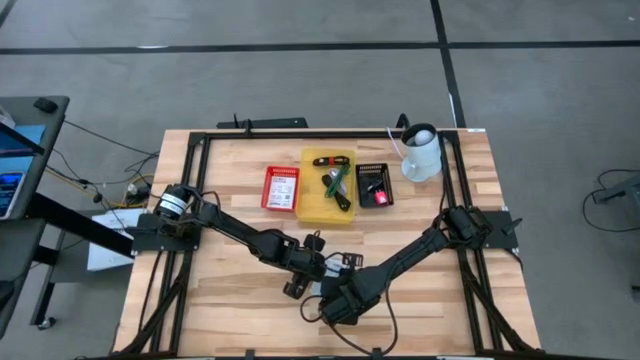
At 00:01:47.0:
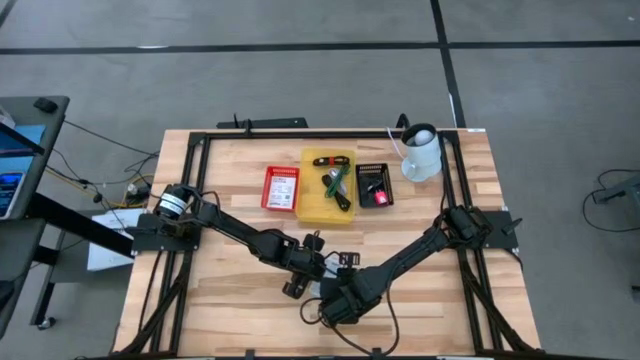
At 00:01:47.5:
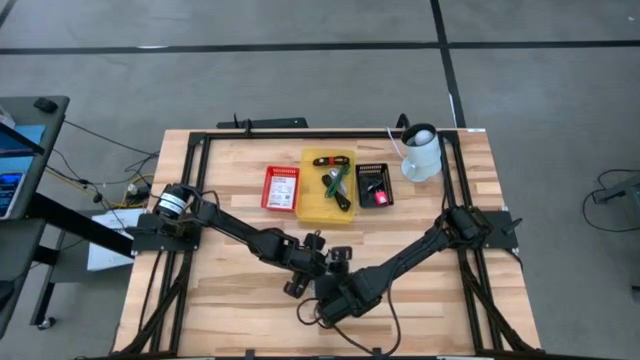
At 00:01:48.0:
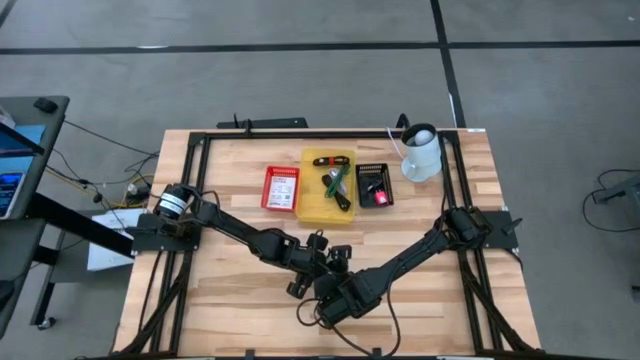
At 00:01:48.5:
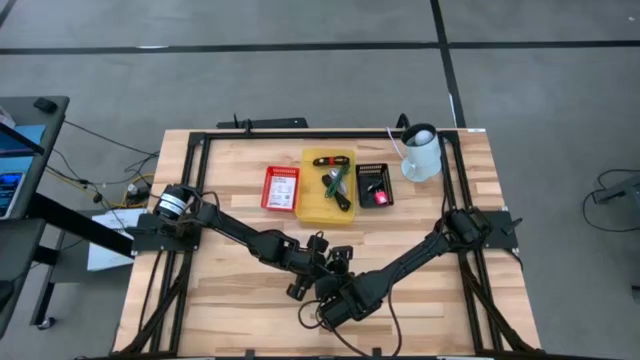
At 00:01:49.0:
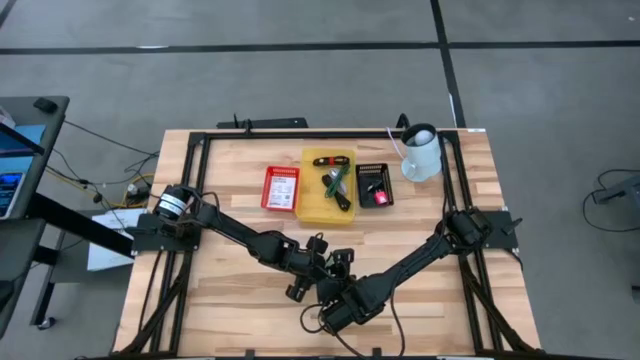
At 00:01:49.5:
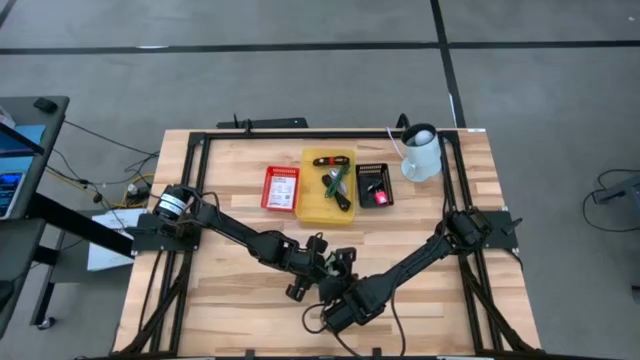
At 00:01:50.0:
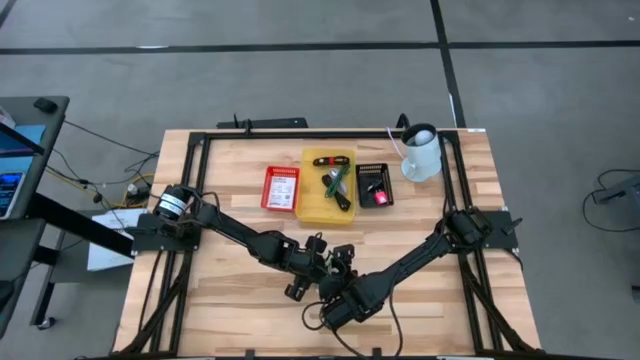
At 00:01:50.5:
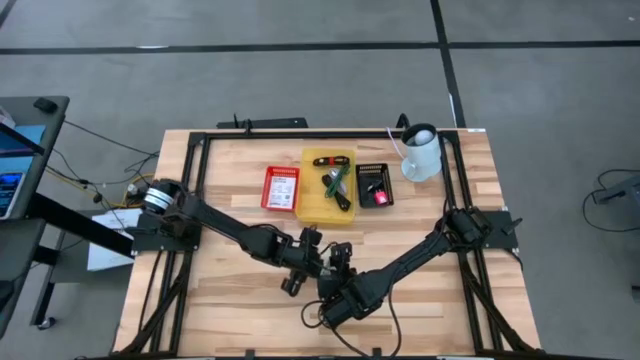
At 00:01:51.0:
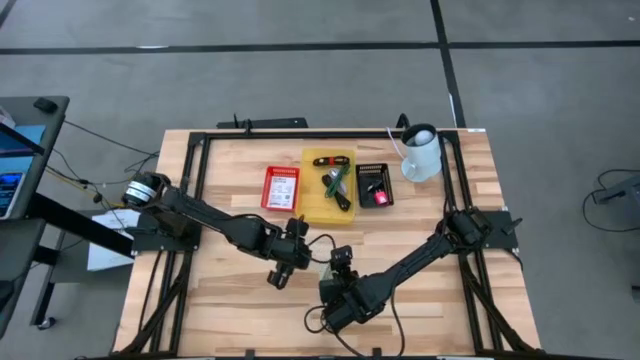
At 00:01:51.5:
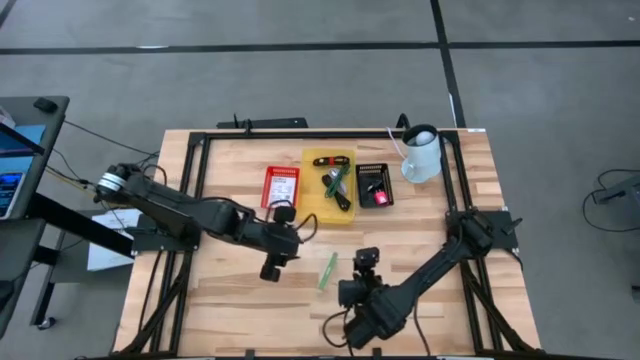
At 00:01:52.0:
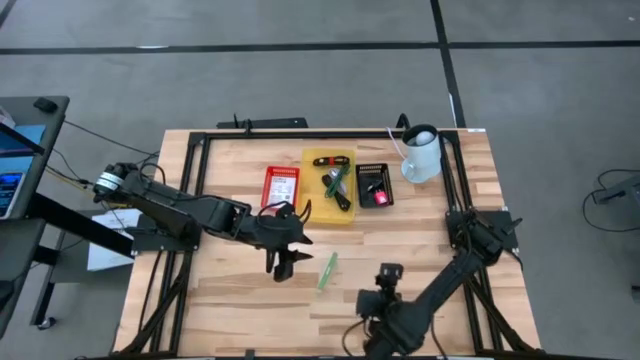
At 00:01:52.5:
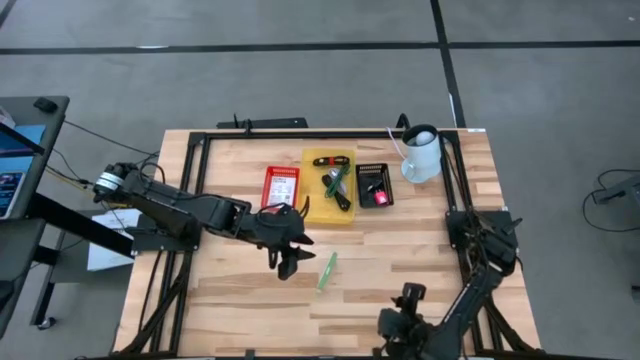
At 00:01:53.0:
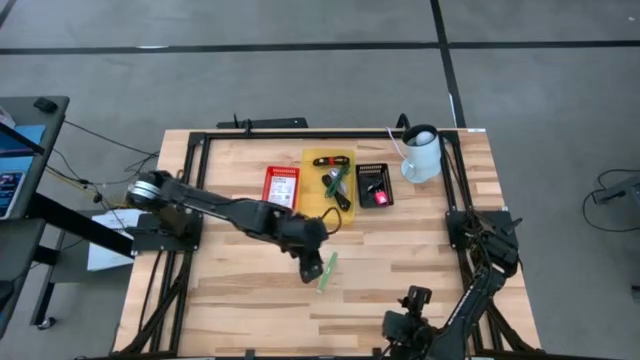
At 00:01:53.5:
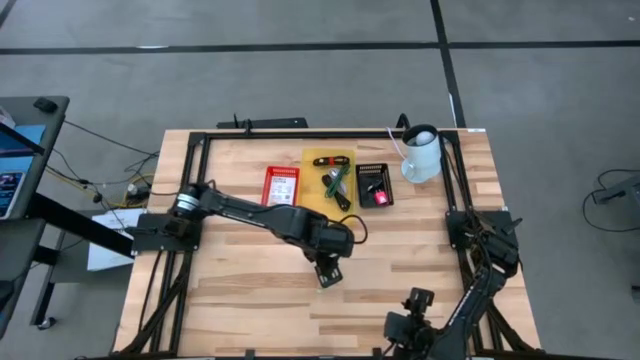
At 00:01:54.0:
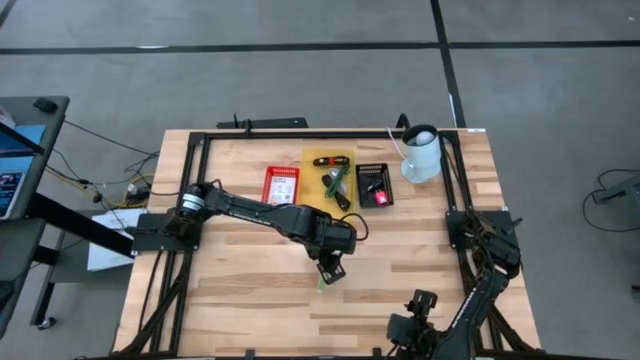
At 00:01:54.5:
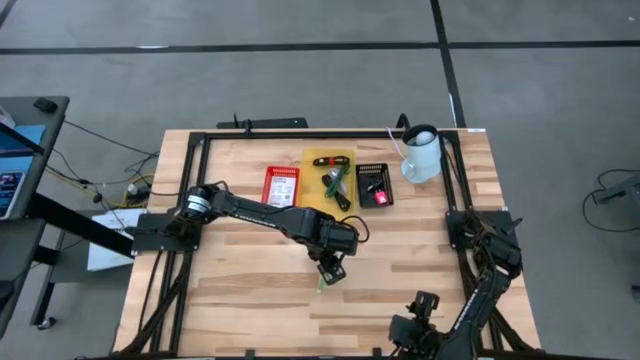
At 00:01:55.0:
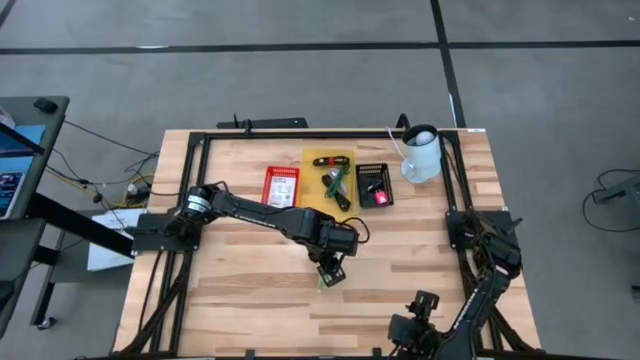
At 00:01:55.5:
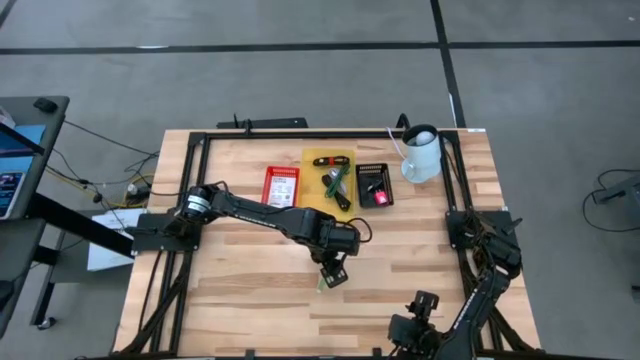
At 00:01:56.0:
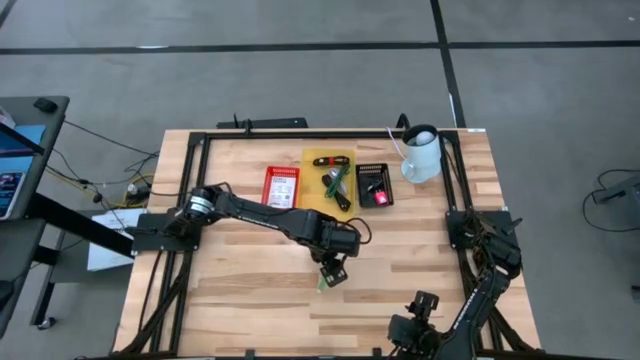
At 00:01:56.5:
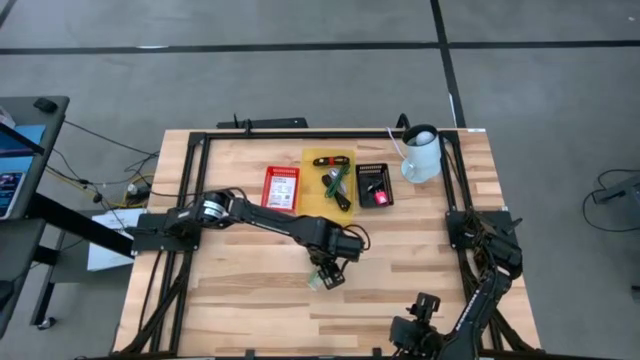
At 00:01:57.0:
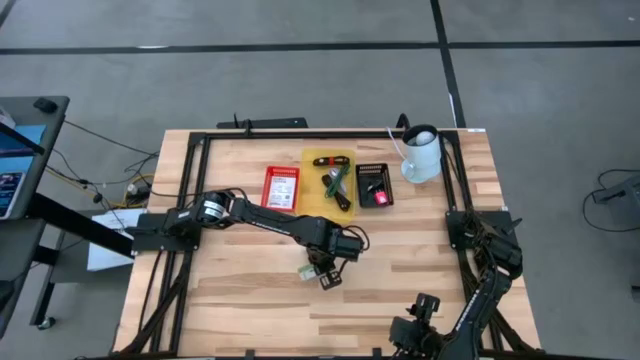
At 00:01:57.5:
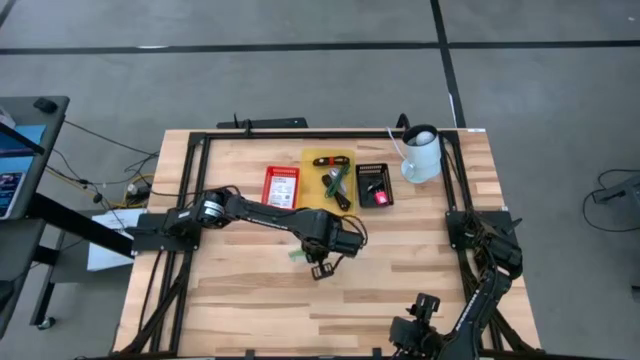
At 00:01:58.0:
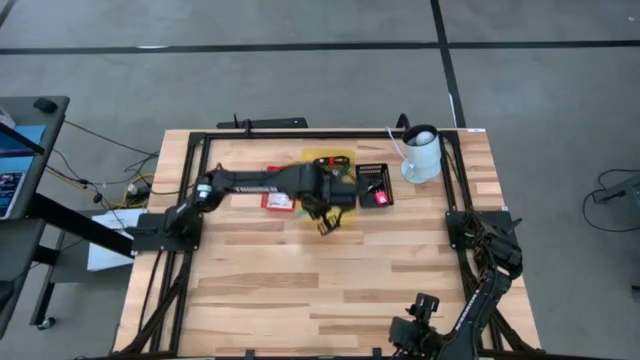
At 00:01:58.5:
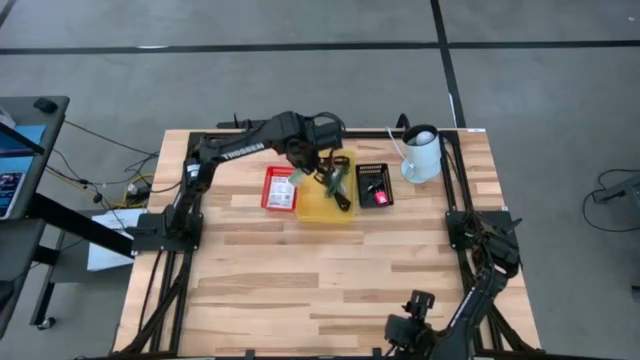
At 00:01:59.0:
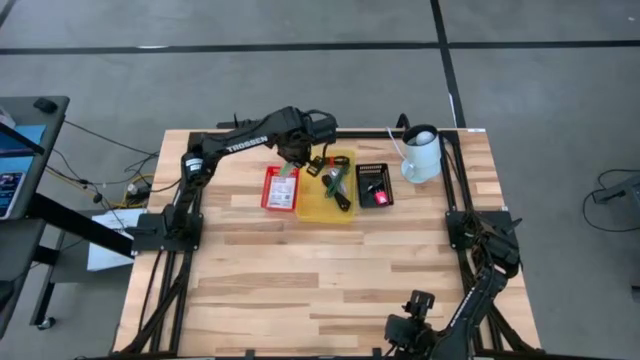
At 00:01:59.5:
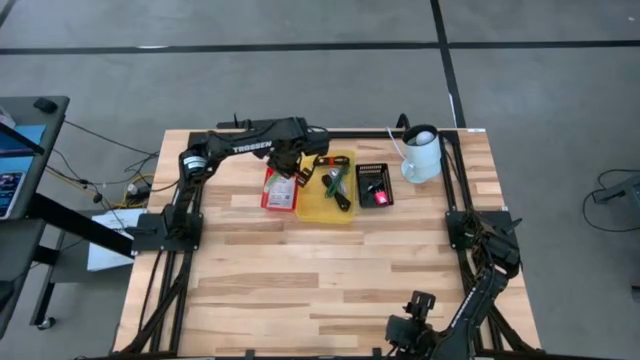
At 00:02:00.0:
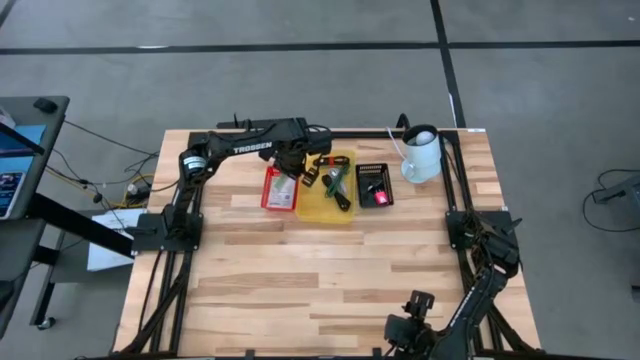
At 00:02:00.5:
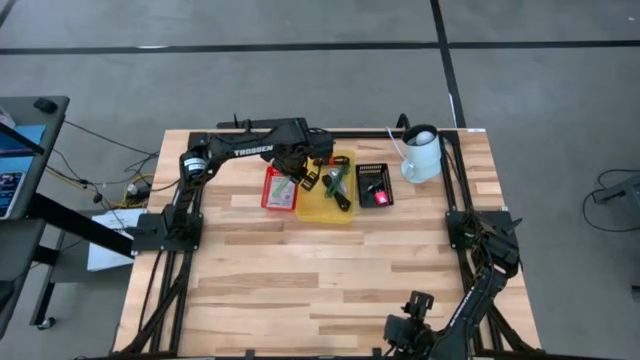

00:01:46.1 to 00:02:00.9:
Task: Pick and place items into bin
Put the card reader box in the red bin

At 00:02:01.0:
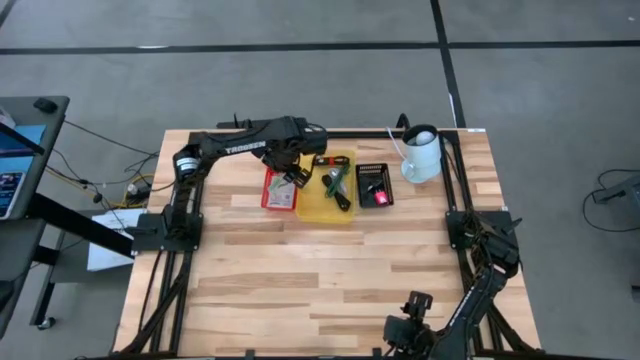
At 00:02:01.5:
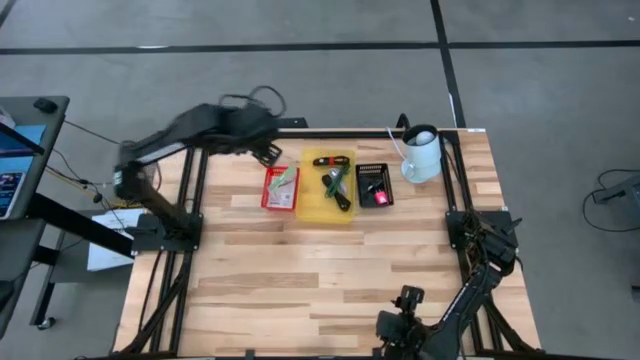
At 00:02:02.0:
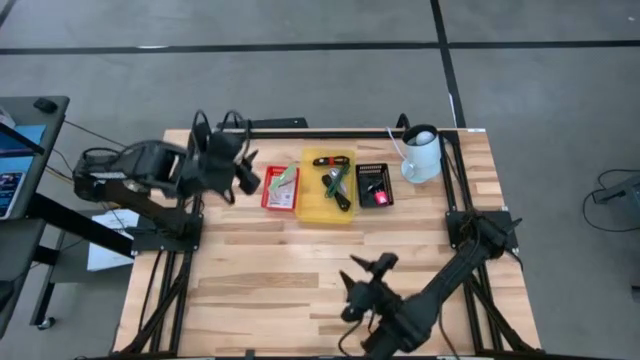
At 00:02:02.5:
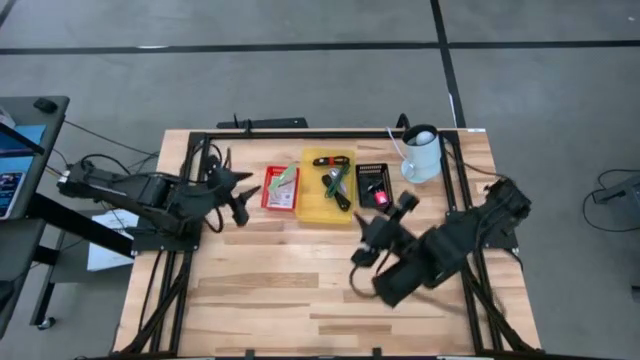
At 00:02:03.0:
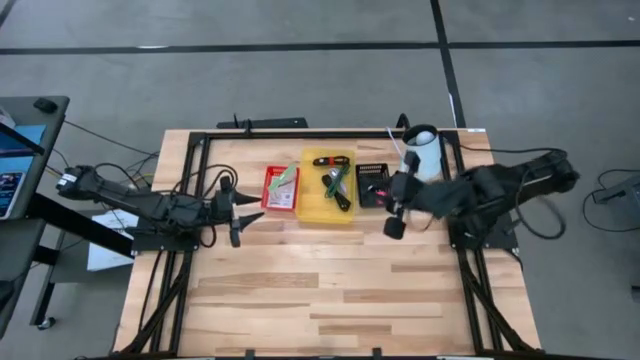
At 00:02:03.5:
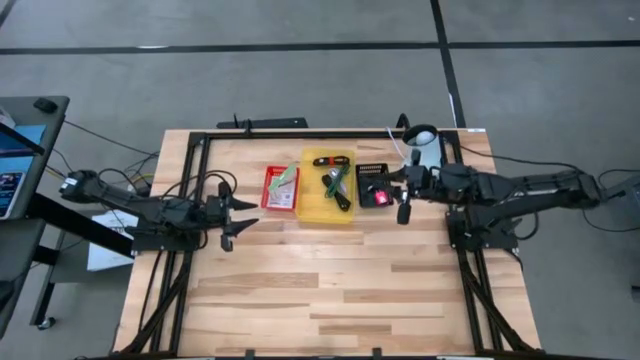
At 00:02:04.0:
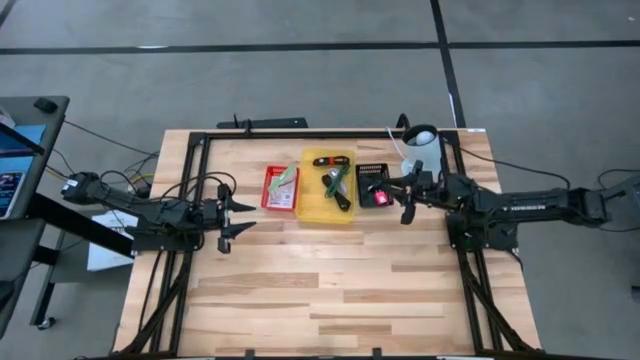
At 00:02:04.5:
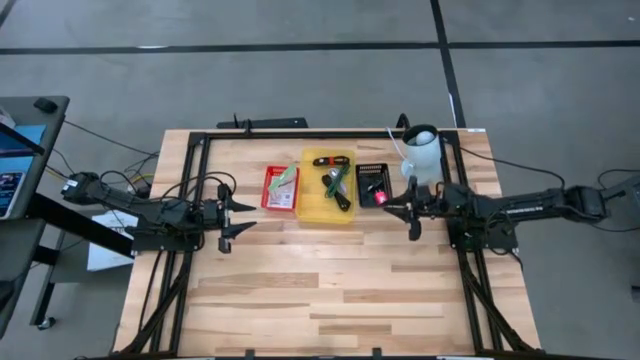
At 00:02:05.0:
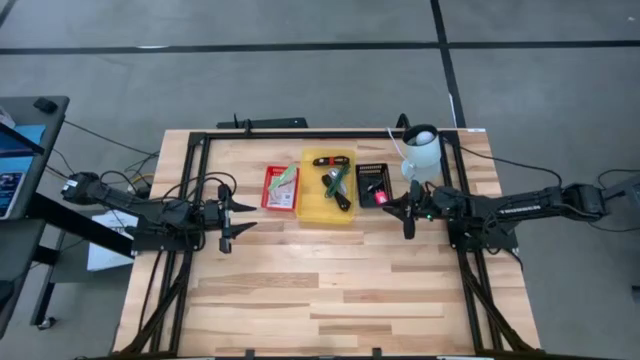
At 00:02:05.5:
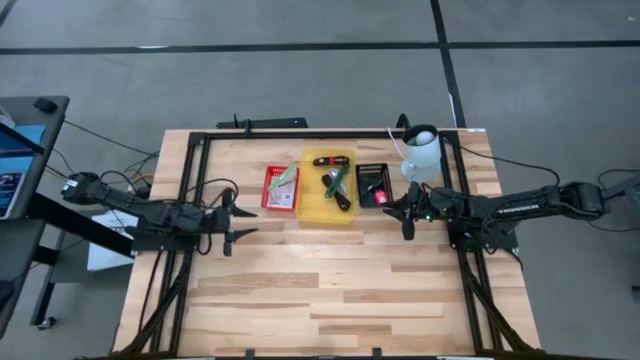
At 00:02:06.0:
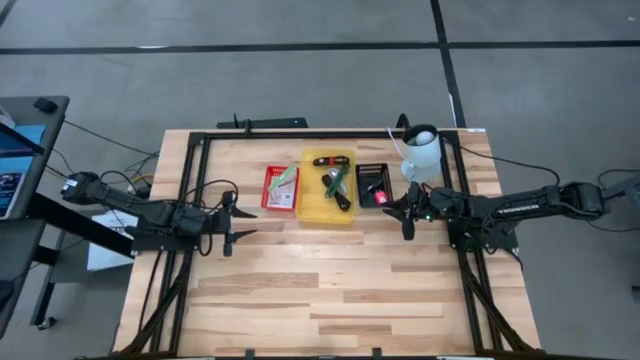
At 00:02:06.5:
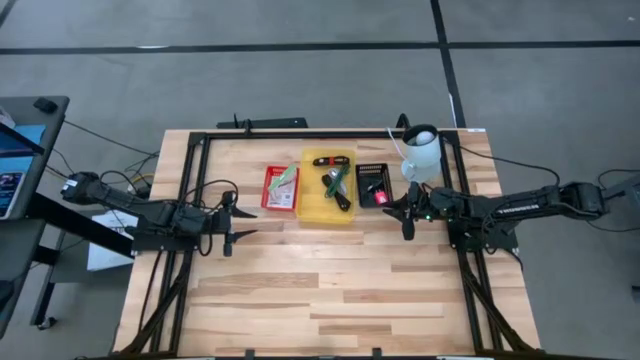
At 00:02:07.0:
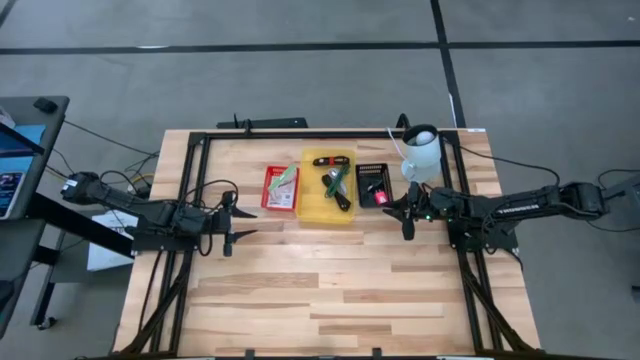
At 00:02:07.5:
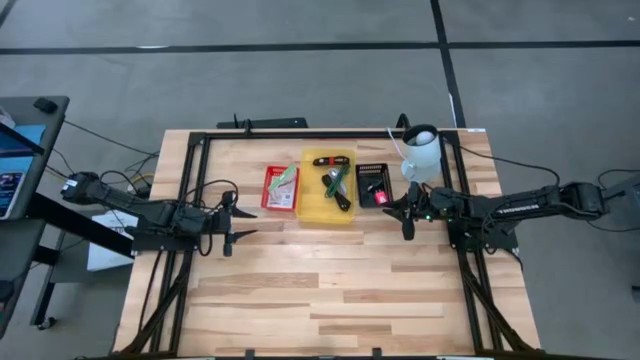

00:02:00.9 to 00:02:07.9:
Return to Home Position
